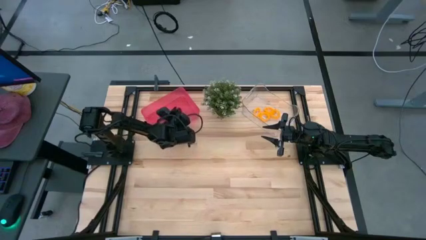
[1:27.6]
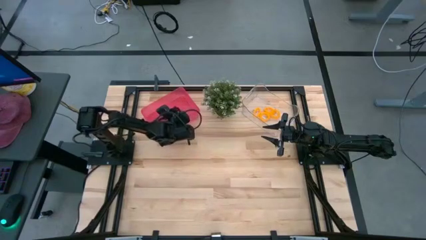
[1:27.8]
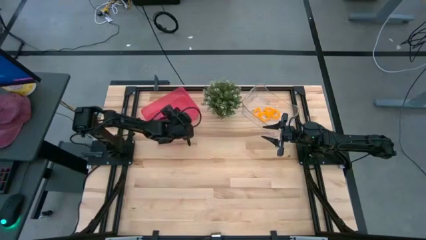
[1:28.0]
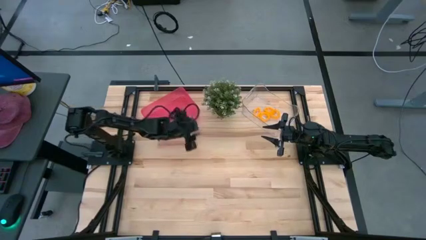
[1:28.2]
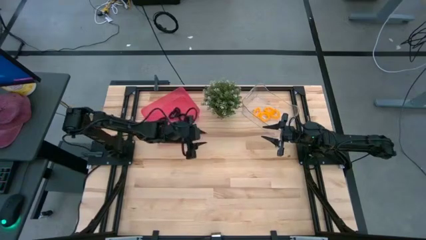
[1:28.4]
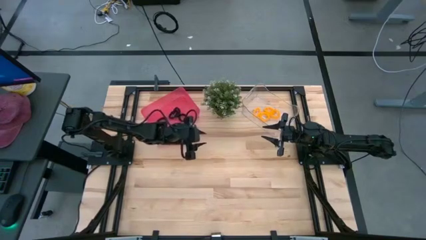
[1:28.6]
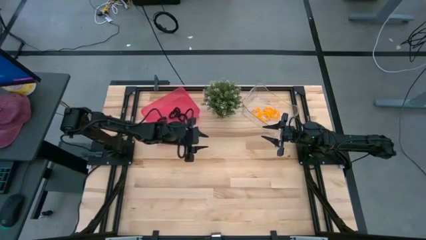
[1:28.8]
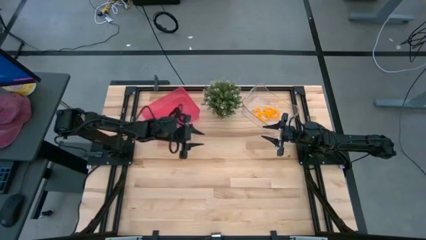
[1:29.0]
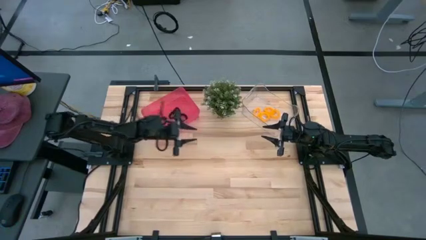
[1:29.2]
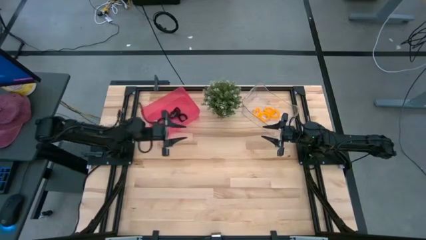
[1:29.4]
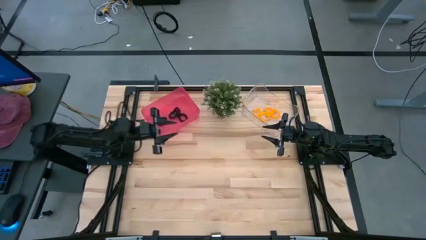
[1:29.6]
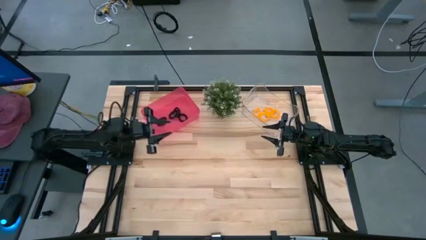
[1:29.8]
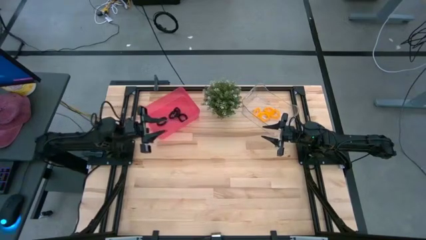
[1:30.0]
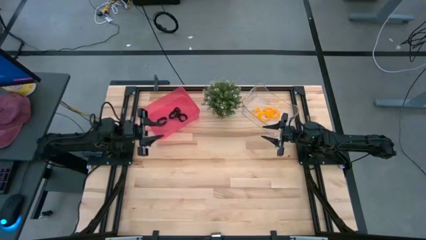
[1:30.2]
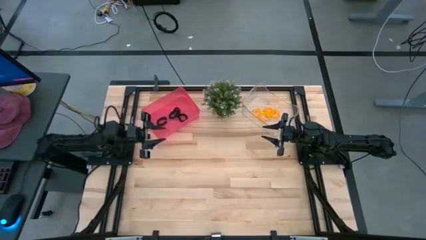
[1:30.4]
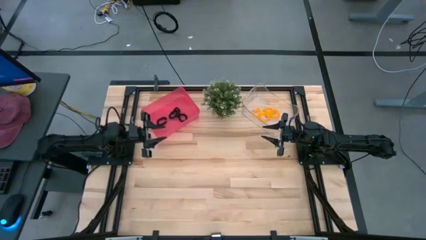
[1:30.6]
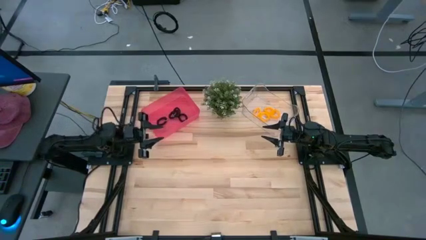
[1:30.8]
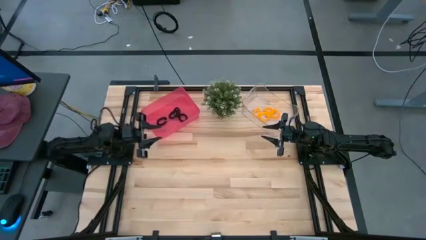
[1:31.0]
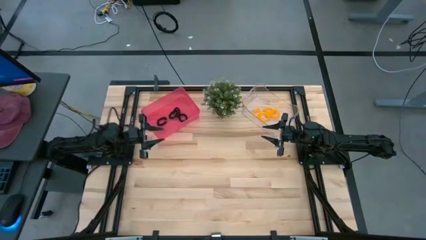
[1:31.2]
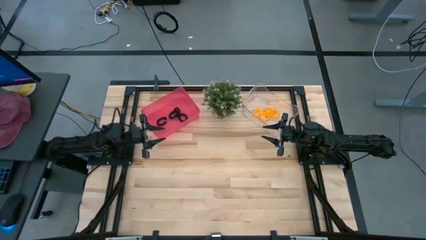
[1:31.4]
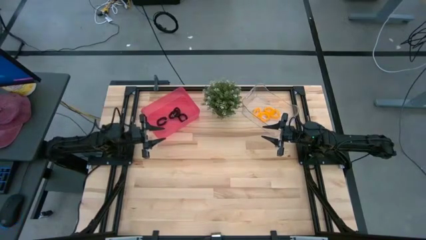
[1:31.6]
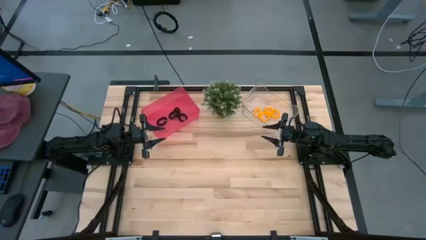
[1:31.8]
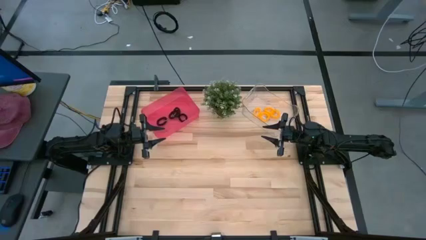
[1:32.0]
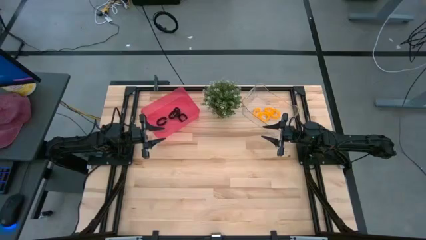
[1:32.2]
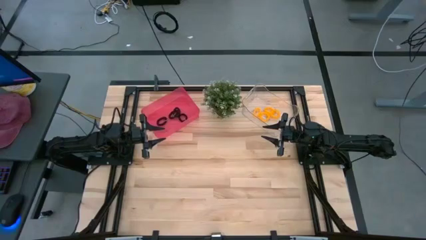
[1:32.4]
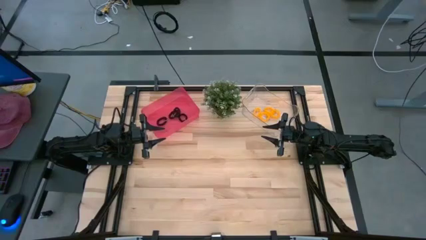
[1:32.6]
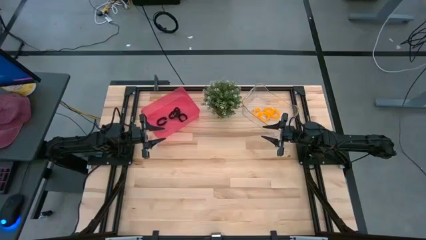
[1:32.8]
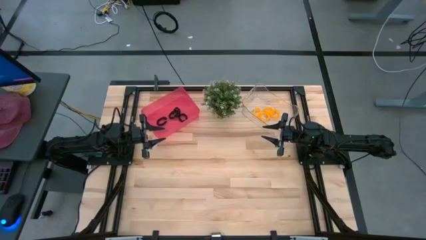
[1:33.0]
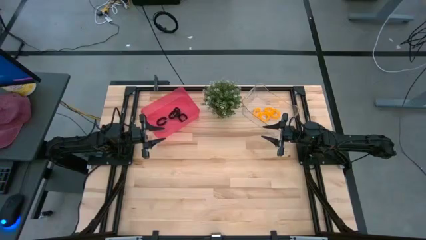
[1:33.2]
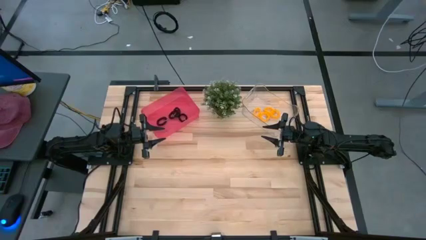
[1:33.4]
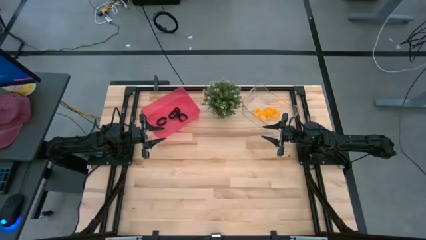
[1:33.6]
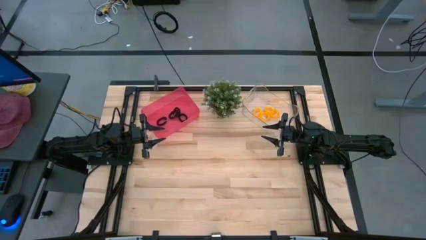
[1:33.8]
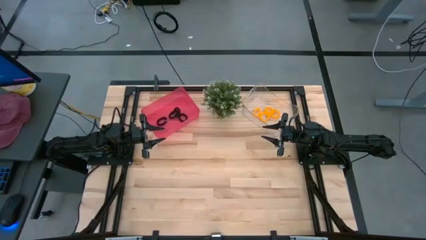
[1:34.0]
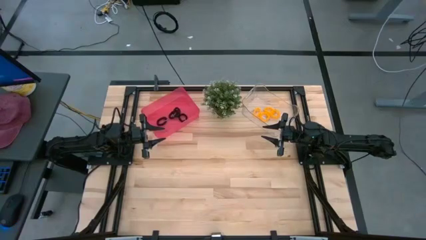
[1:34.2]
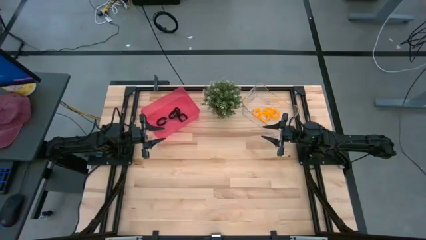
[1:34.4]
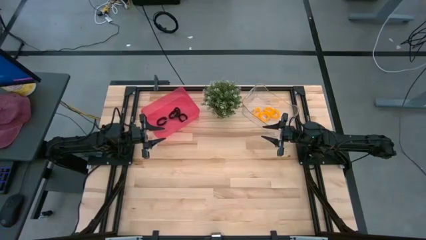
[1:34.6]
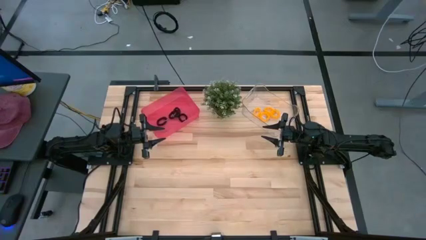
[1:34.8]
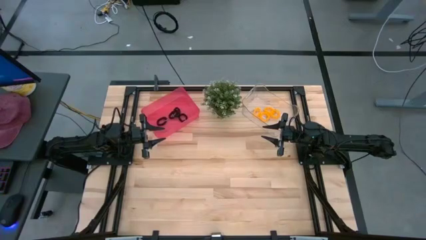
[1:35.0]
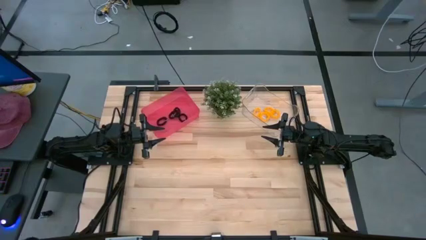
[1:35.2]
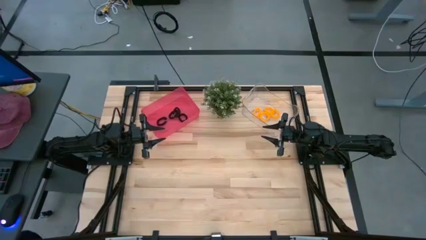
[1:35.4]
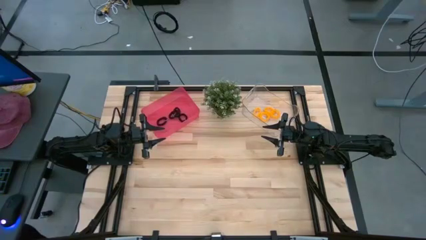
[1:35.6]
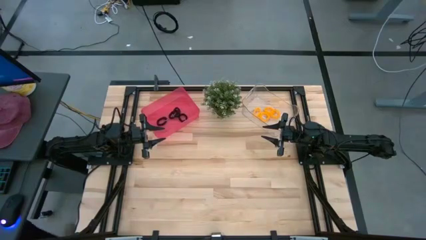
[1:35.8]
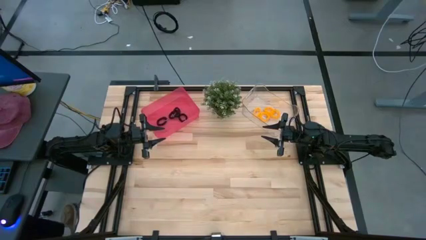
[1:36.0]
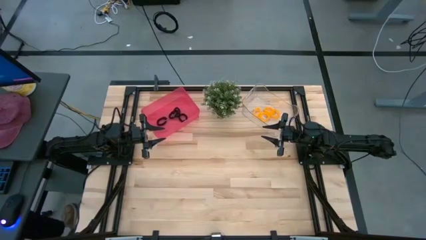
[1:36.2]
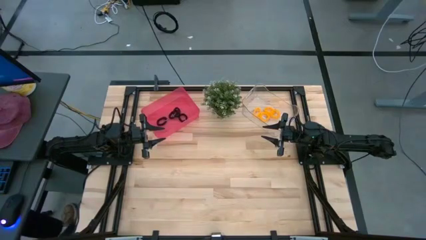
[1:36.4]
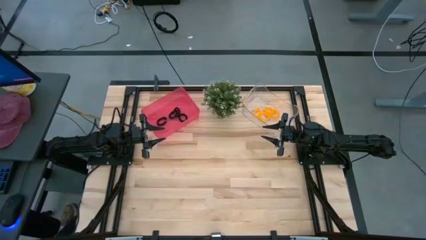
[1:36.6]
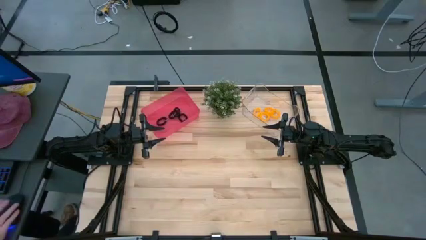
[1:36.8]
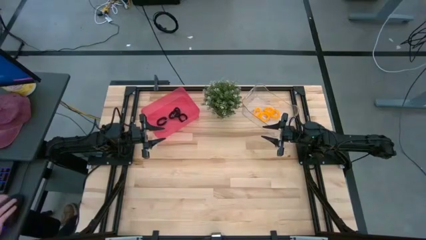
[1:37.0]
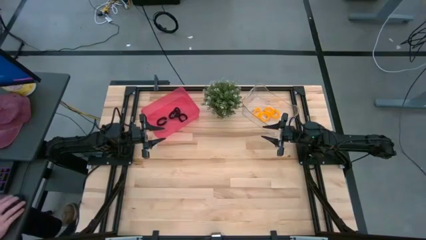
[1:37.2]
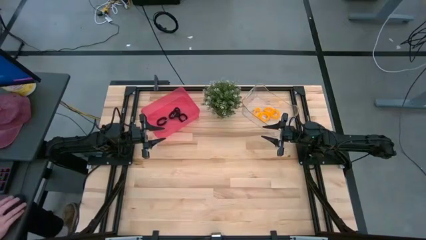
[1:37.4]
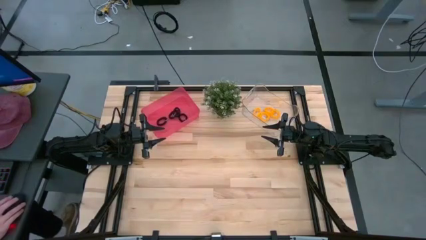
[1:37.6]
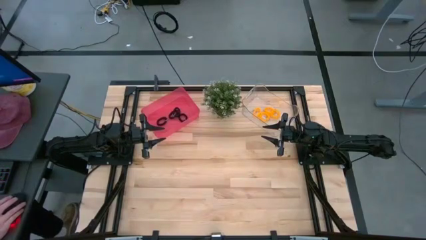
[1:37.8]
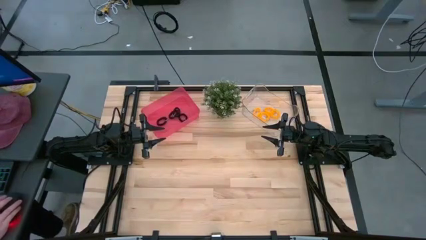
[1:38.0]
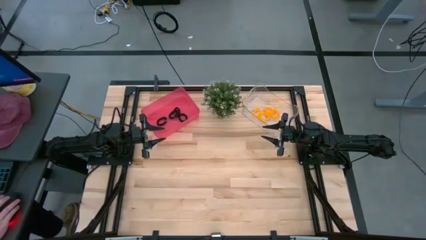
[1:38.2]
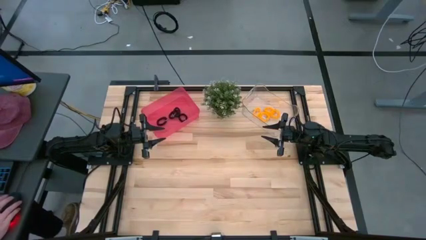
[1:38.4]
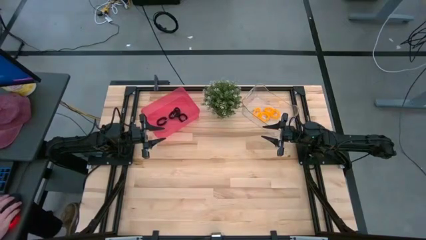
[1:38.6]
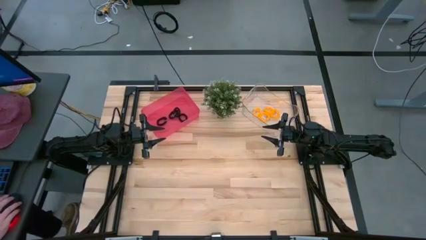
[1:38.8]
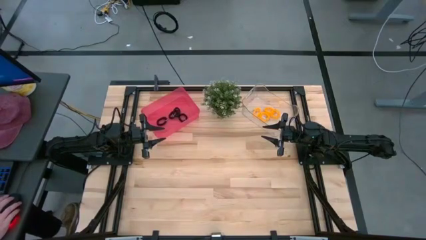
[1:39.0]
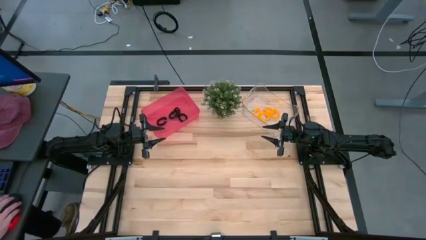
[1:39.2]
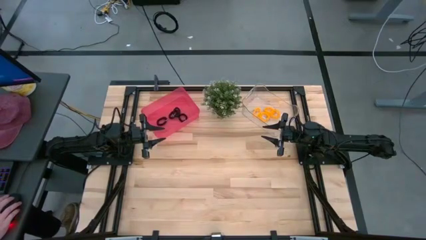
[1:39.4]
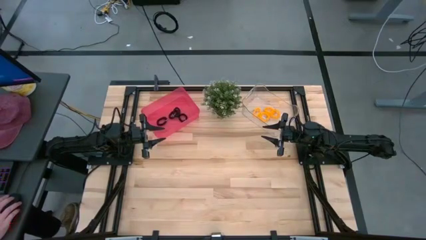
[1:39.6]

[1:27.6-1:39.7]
Task: Sort spring keychains
Return to home position
